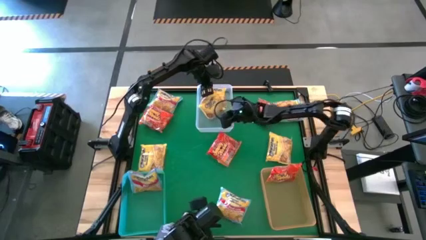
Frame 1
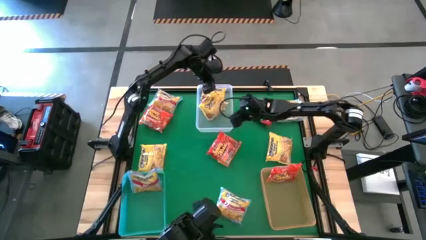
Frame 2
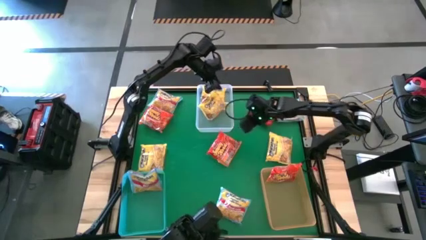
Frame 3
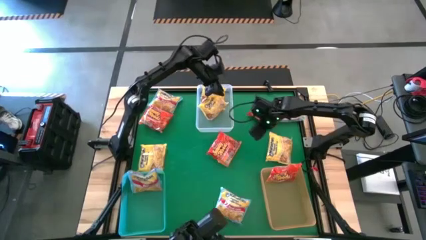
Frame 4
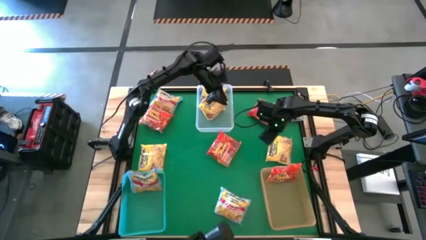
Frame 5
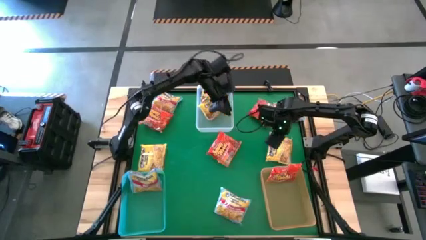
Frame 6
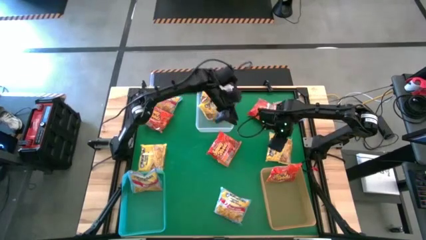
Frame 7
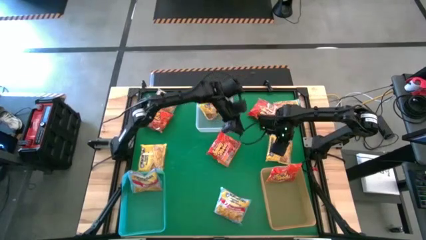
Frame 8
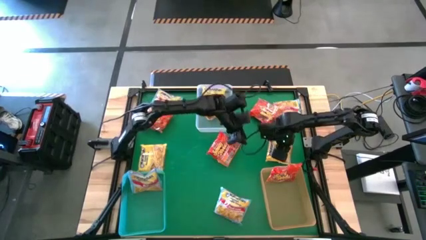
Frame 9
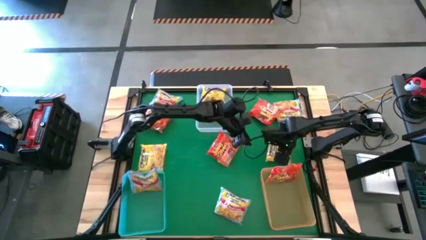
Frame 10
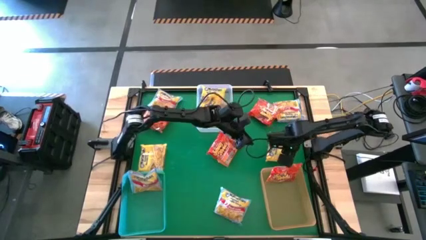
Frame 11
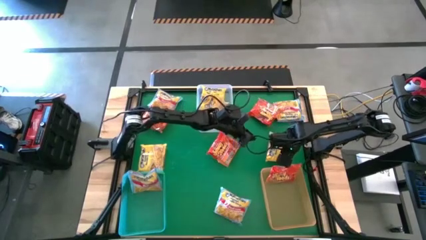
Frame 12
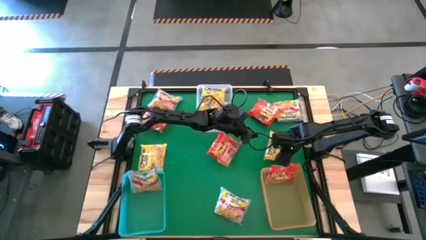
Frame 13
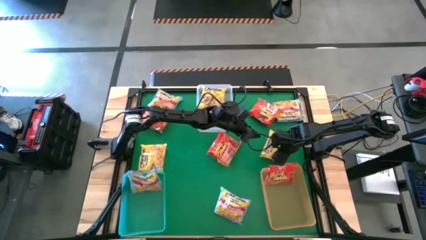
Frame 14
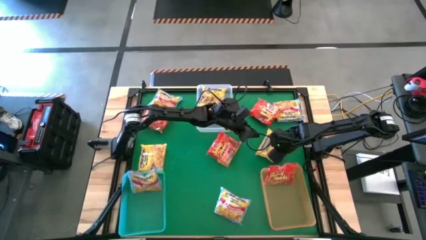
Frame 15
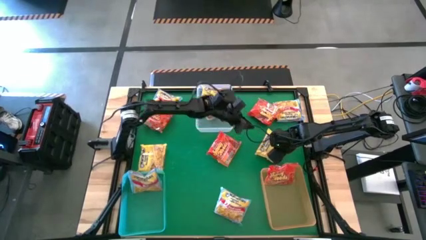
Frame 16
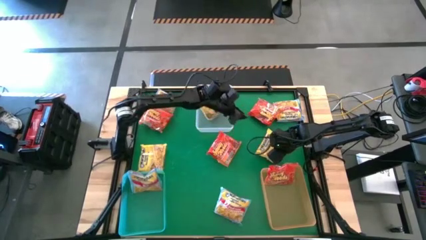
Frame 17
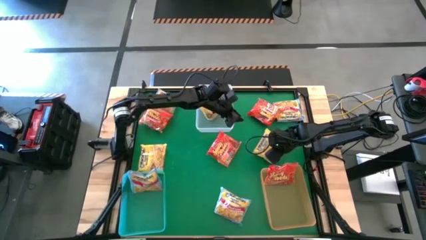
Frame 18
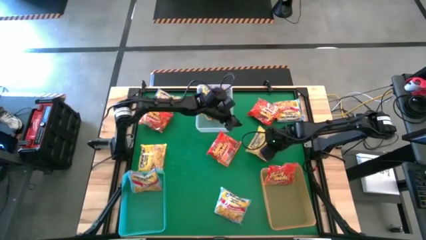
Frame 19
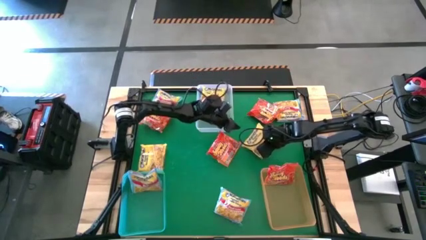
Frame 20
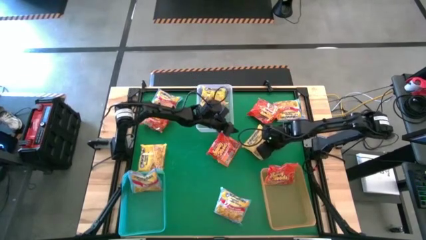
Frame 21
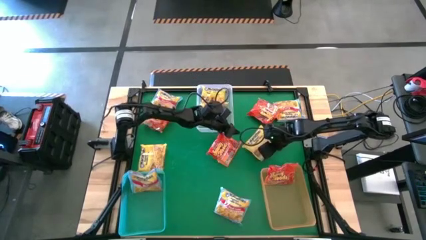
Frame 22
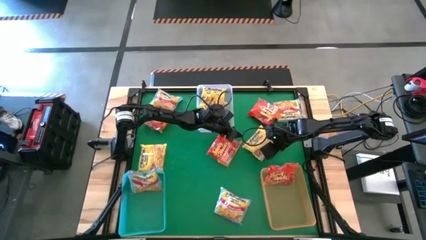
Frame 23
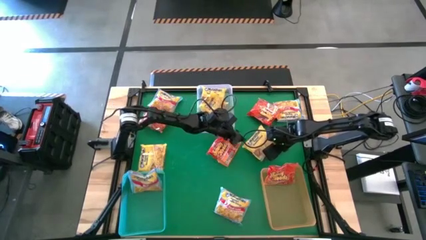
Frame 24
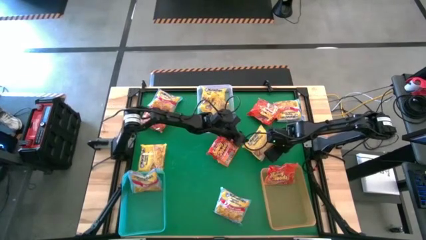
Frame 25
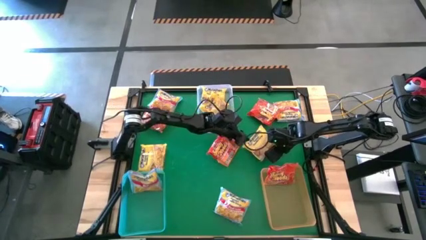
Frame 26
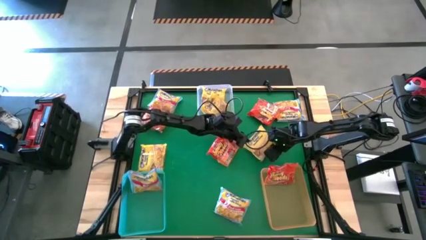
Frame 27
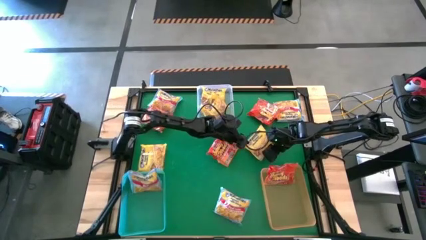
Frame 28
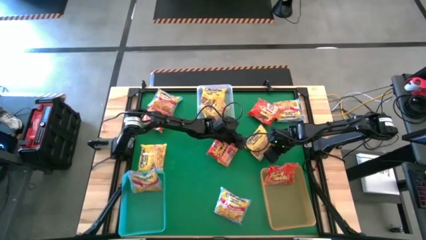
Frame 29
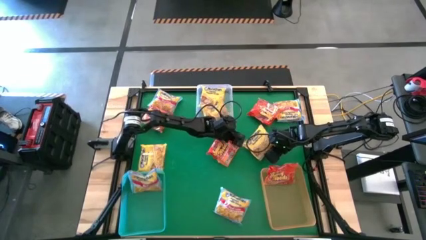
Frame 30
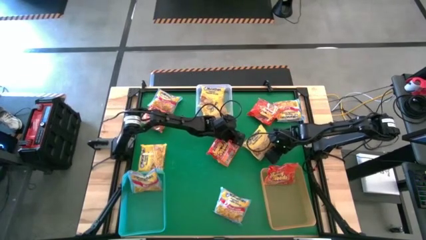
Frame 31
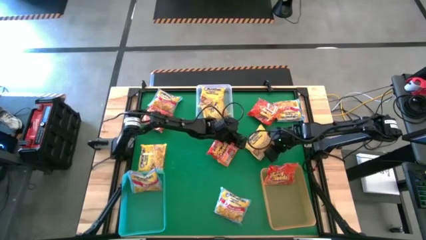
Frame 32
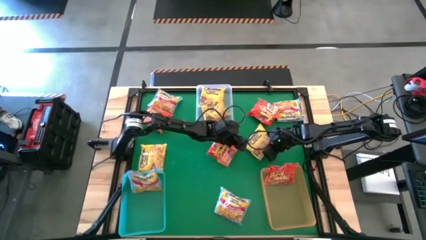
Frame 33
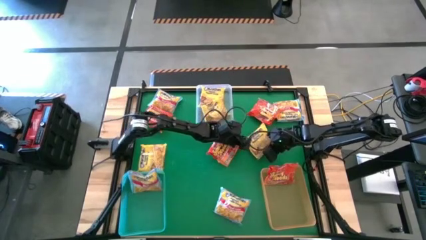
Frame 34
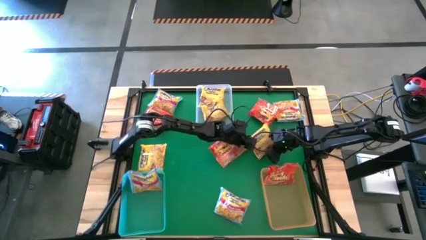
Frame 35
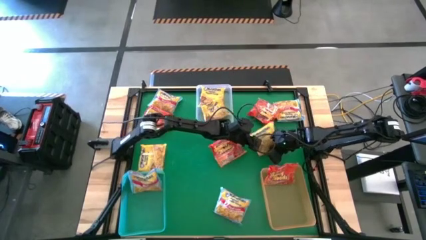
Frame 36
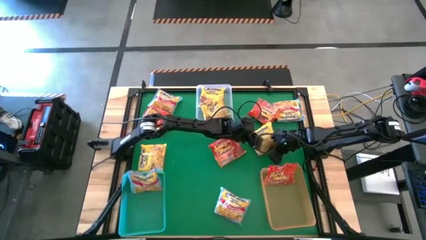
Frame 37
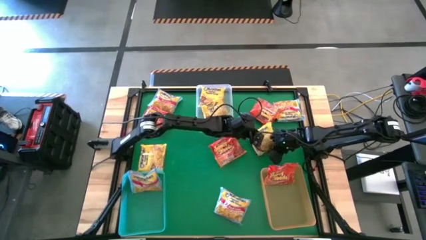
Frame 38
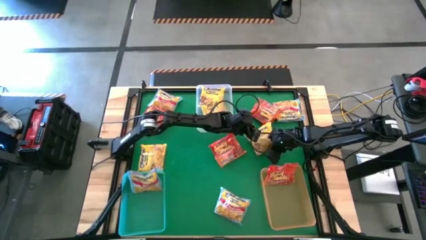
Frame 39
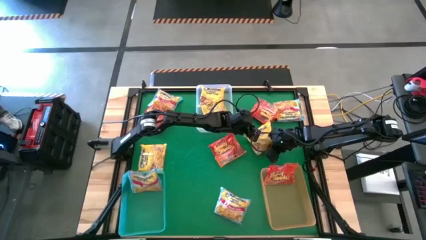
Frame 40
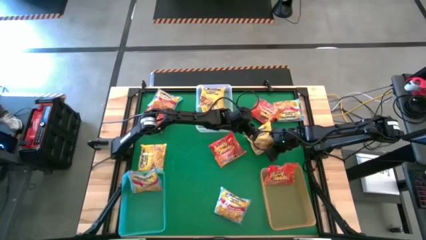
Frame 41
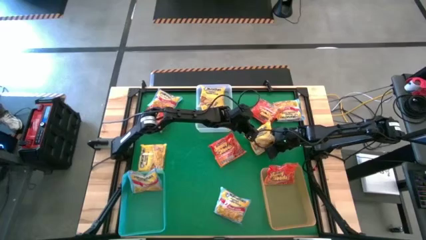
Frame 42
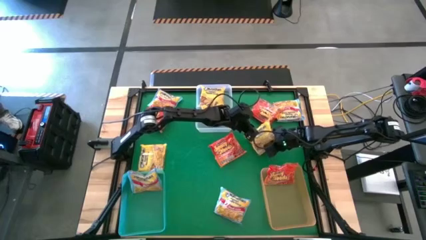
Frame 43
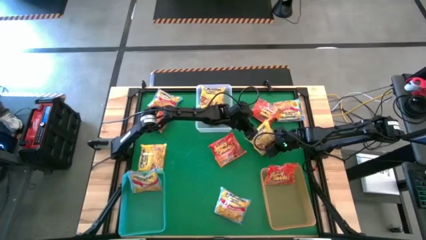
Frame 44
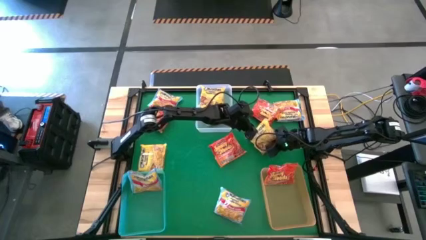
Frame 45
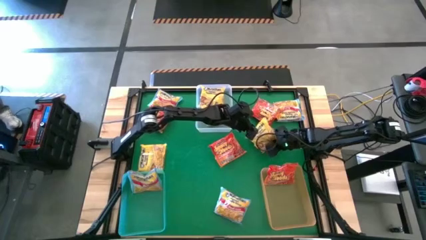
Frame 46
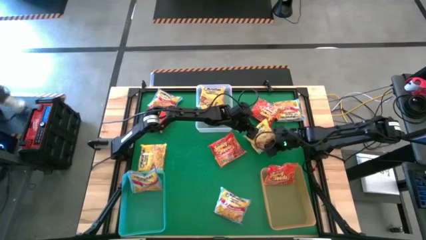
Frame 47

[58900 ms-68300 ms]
Task: Sort Maruchan noodles
Put the right yellow noodle pack into the transparent bin

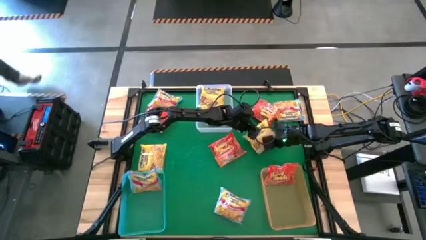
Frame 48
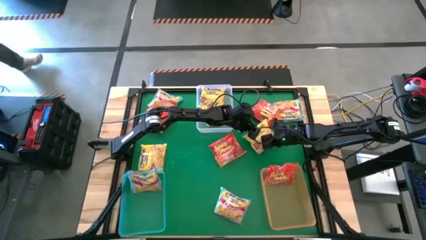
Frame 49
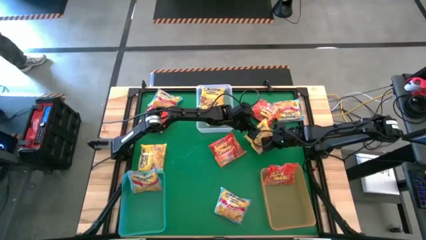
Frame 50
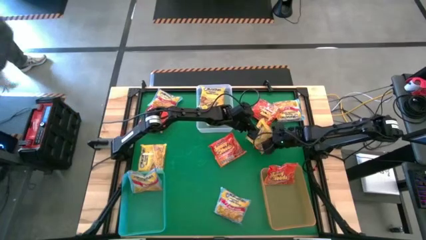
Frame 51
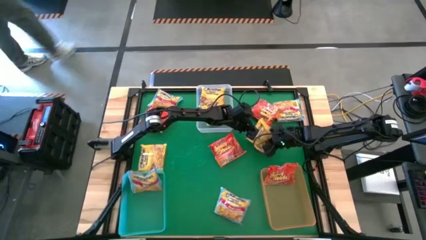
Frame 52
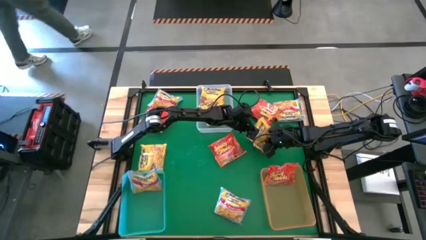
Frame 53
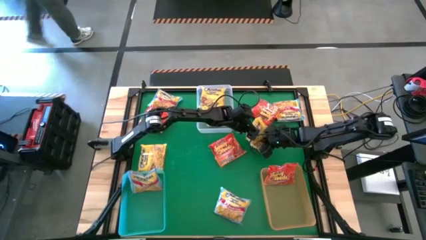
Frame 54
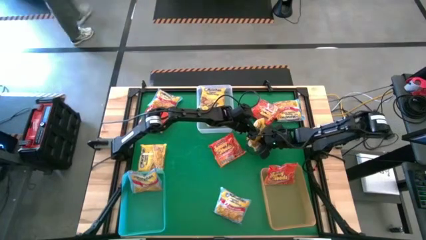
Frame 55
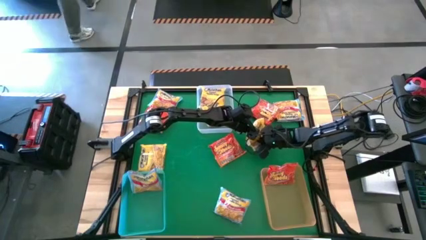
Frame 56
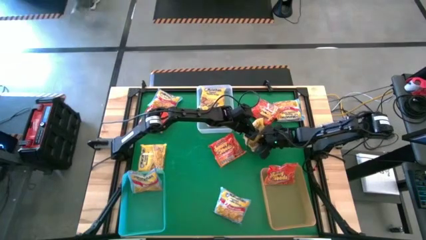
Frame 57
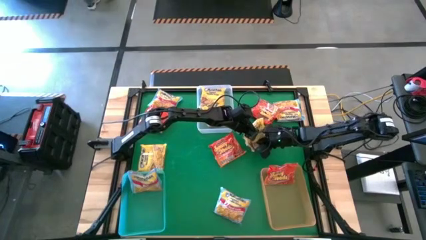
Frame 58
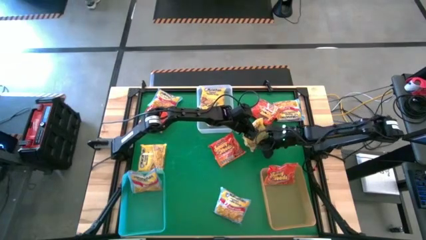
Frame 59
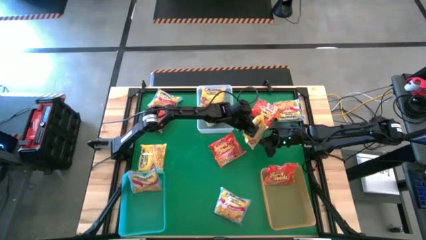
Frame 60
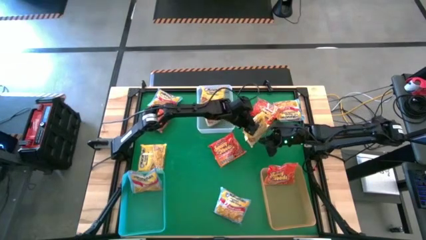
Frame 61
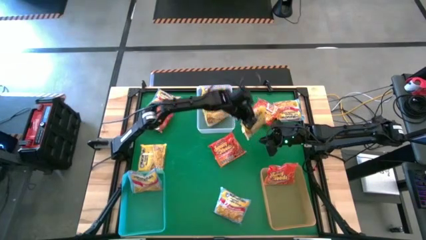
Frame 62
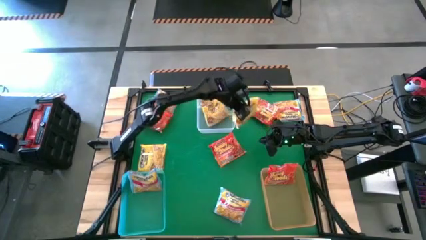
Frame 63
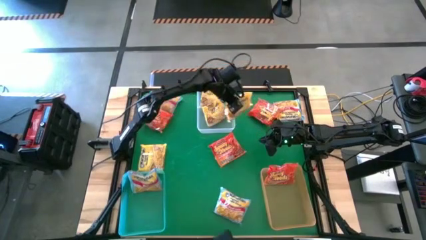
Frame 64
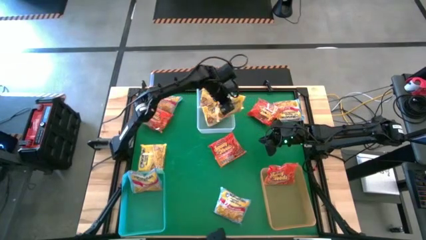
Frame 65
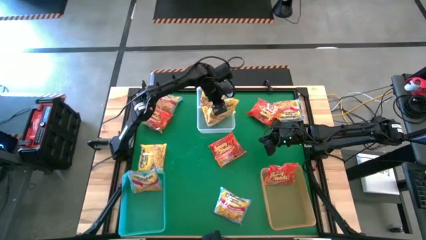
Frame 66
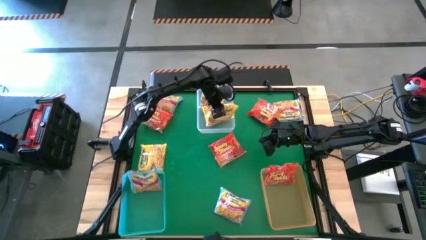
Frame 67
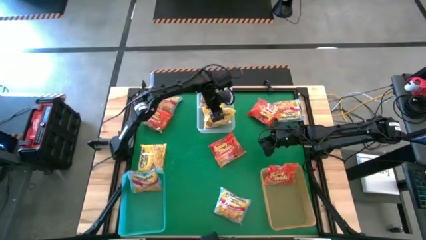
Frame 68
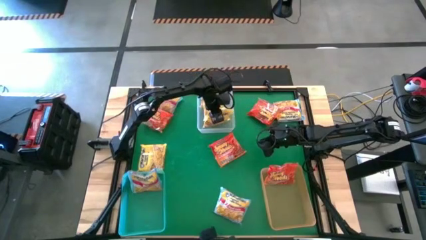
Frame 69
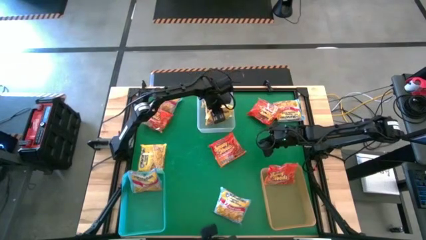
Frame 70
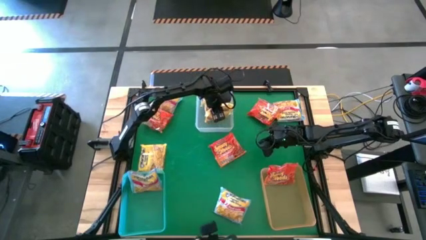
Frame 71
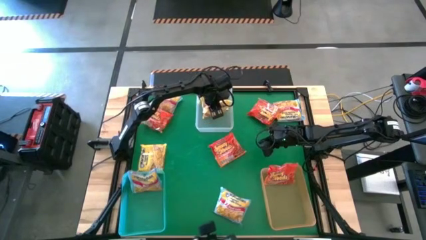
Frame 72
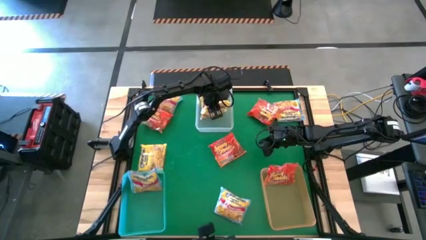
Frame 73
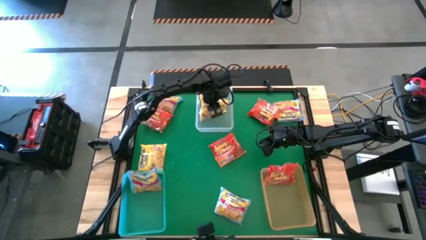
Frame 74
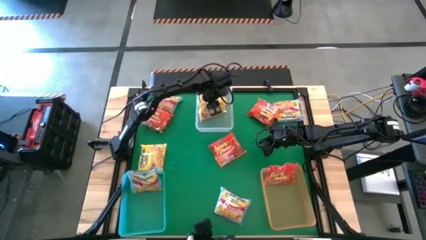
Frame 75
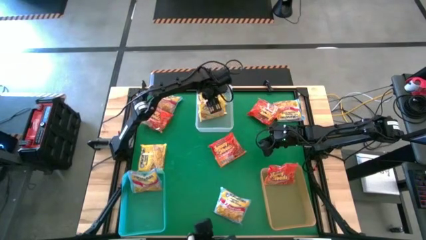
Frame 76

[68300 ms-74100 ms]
Put the right yellow noodle pack into the transparent bin
